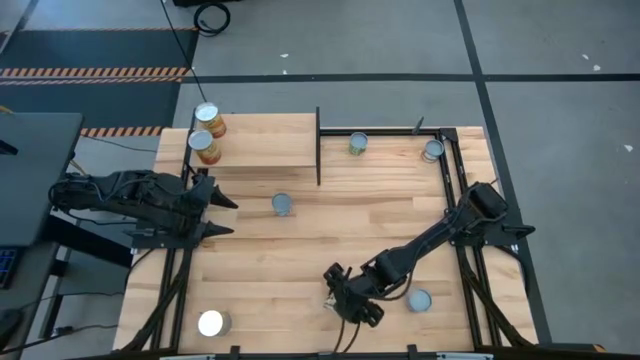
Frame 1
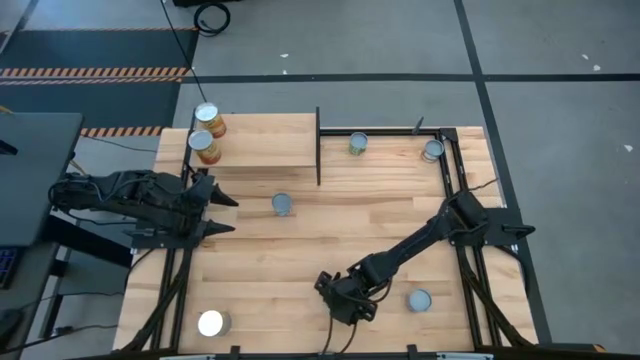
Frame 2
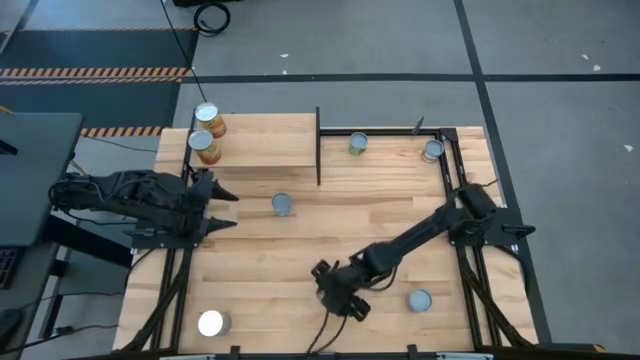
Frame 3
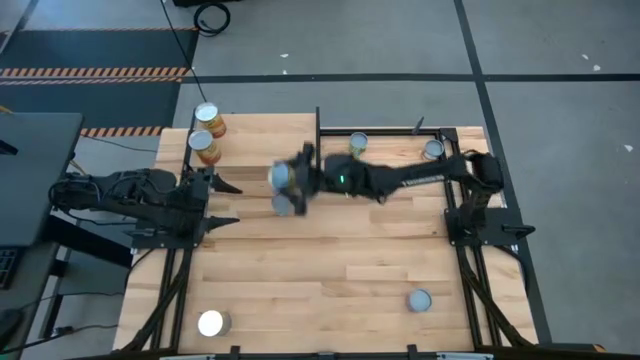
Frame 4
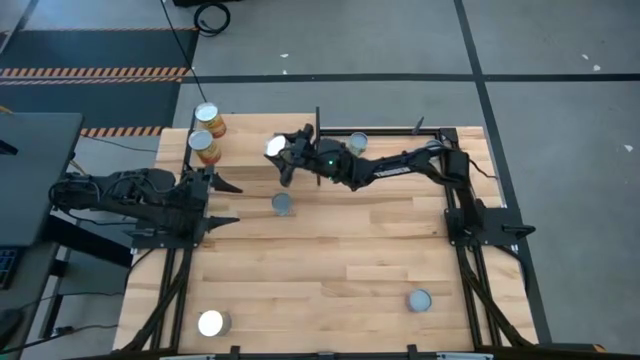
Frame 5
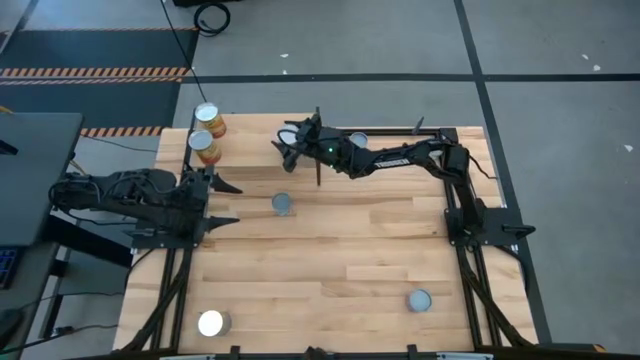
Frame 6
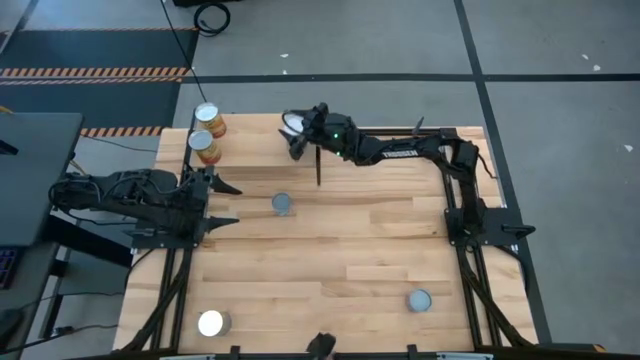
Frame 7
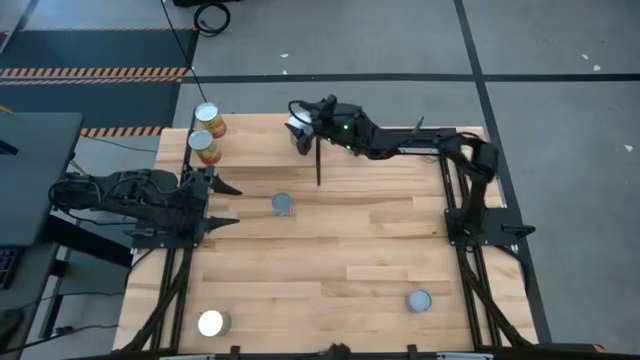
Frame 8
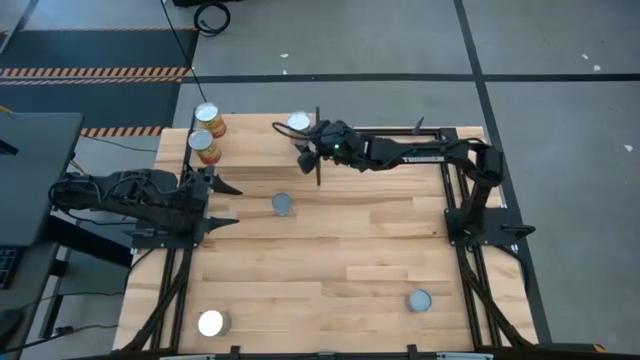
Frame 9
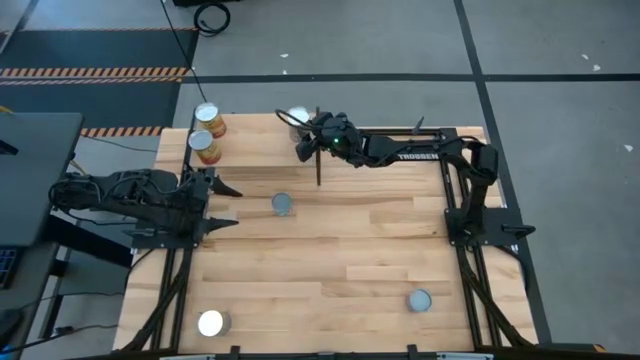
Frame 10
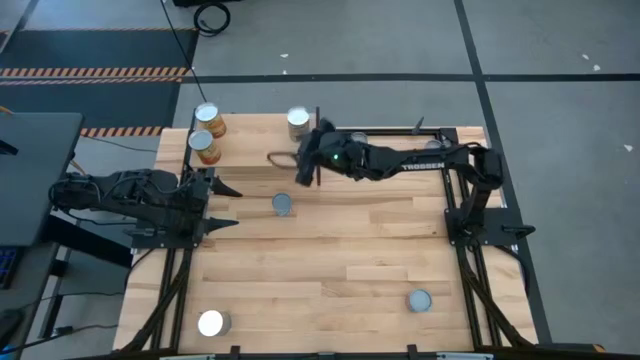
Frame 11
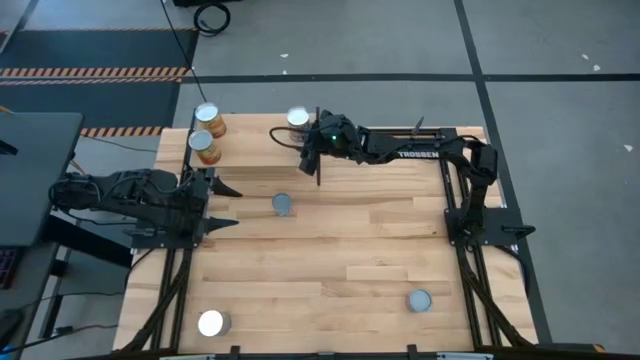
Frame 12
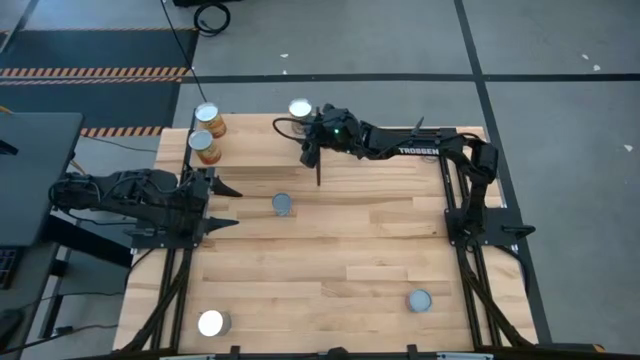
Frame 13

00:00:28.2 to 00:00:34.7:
Task: Pick and place cans onto a shelf
Put the right canned peaches on the shelf

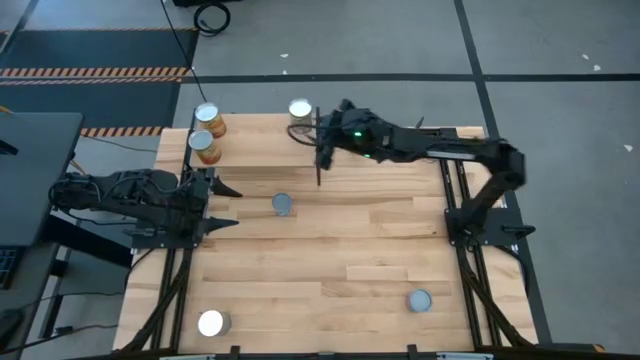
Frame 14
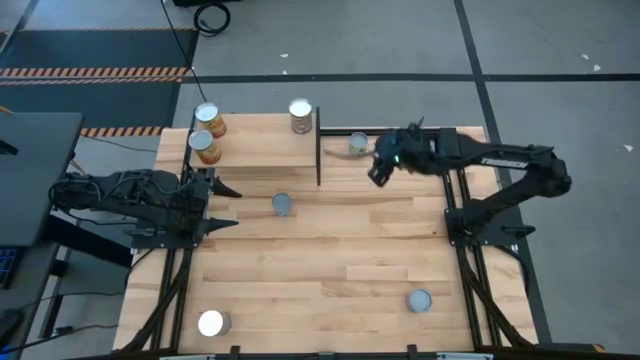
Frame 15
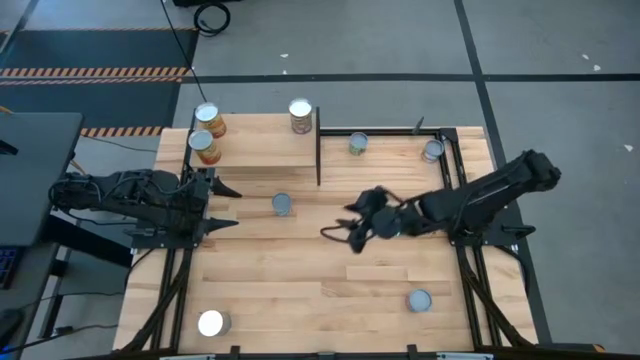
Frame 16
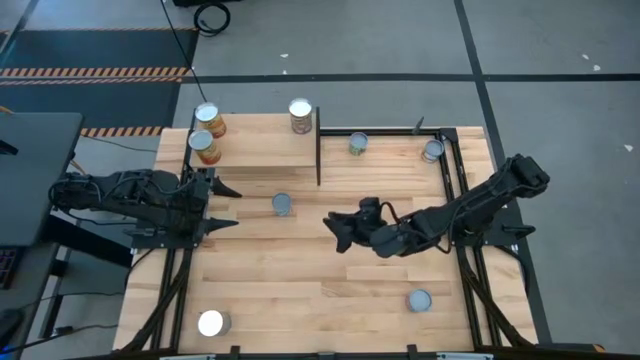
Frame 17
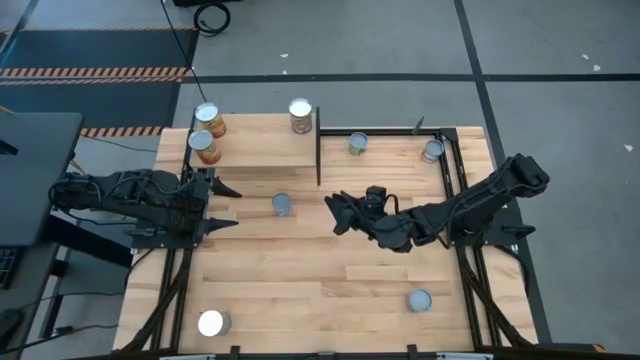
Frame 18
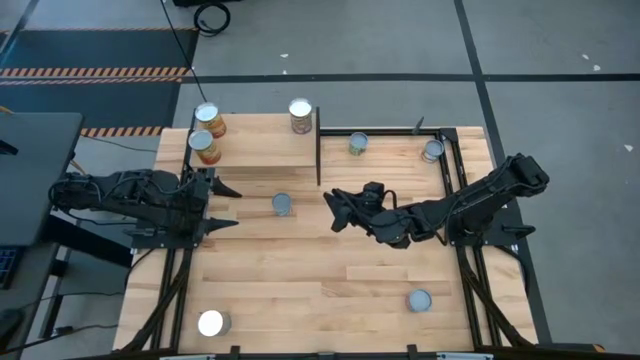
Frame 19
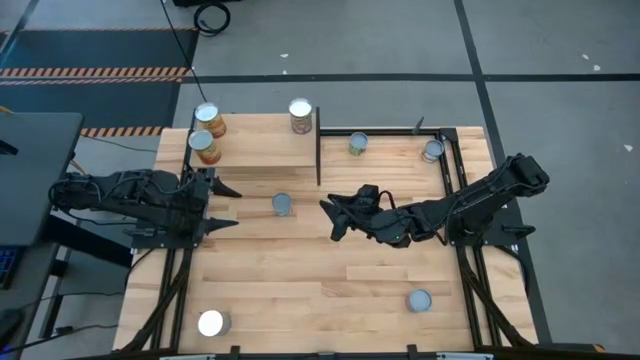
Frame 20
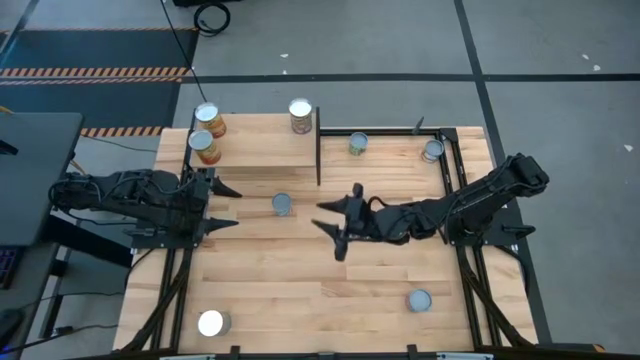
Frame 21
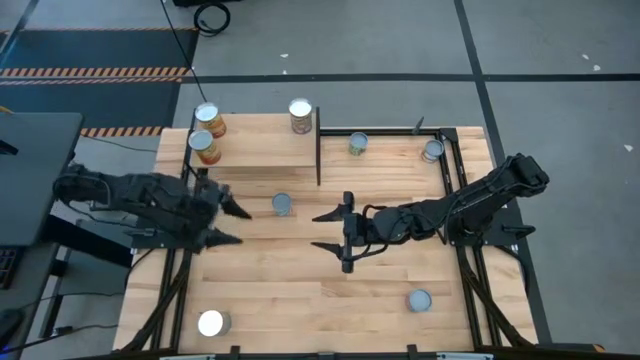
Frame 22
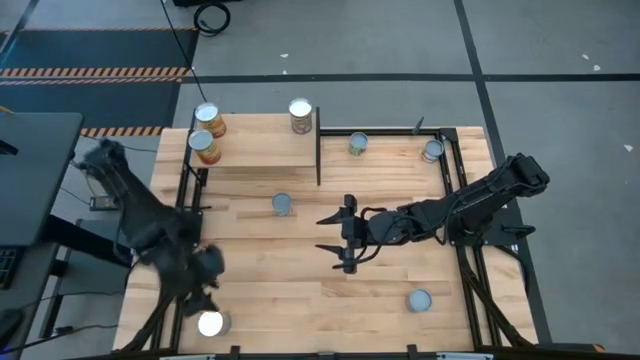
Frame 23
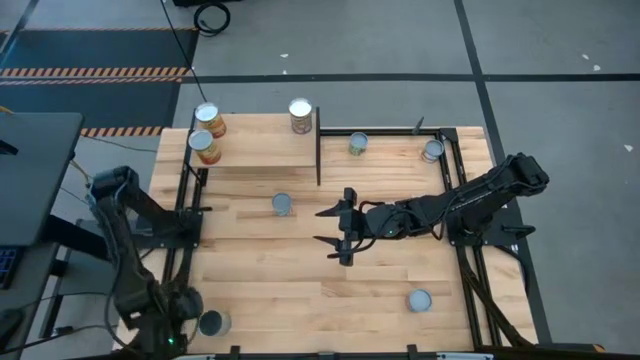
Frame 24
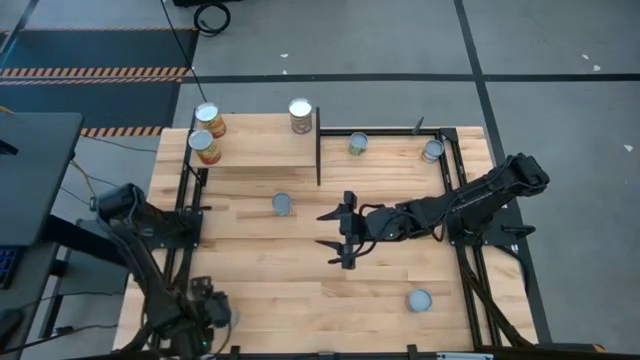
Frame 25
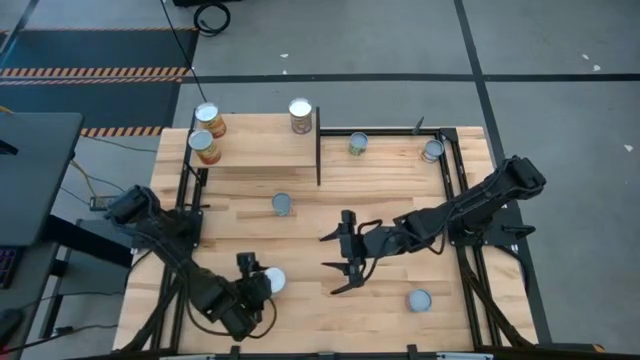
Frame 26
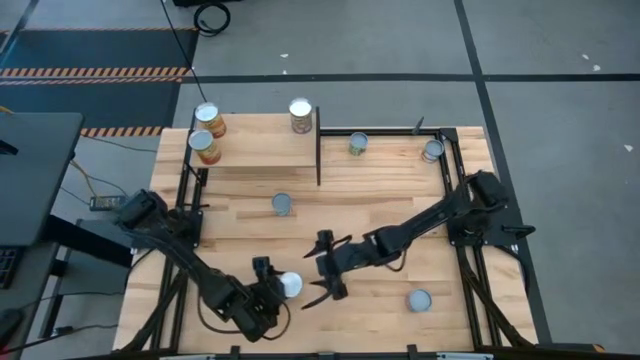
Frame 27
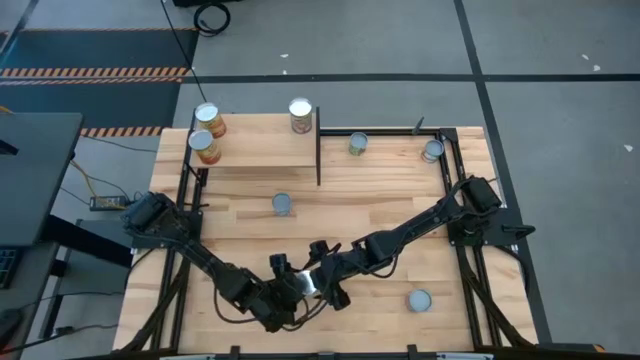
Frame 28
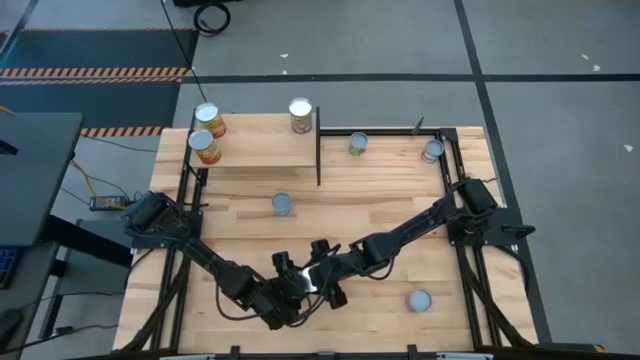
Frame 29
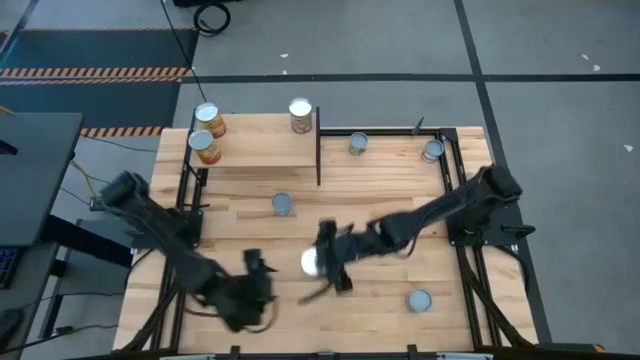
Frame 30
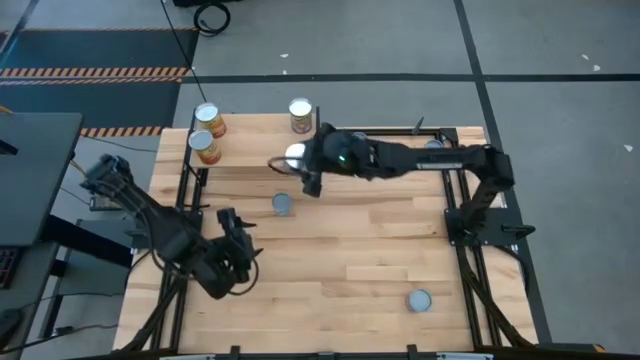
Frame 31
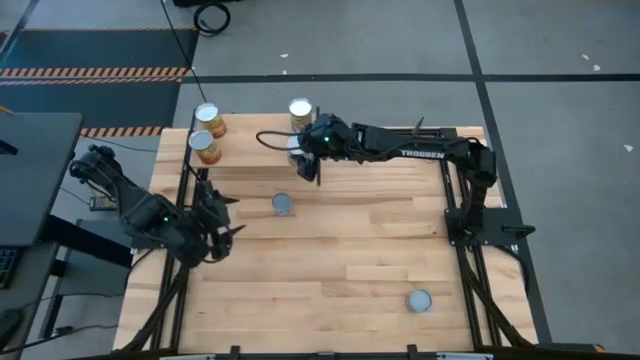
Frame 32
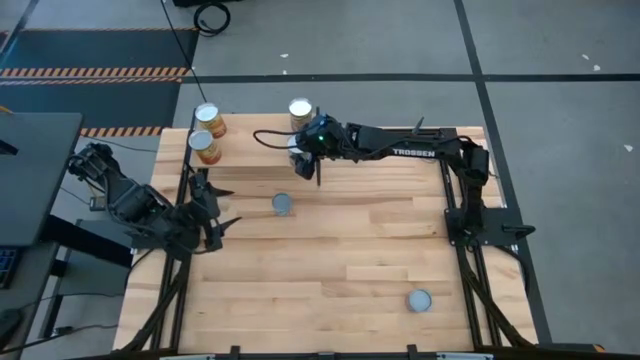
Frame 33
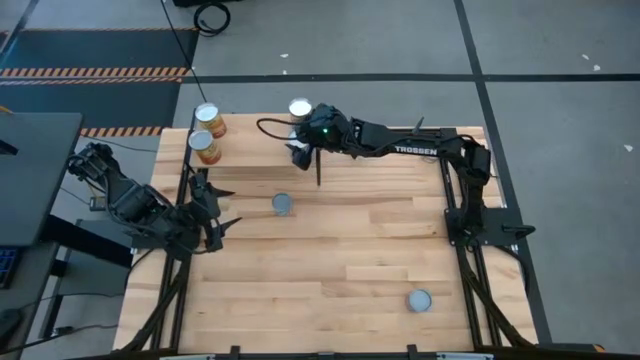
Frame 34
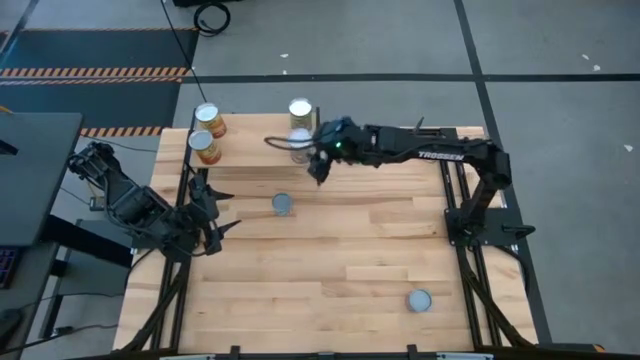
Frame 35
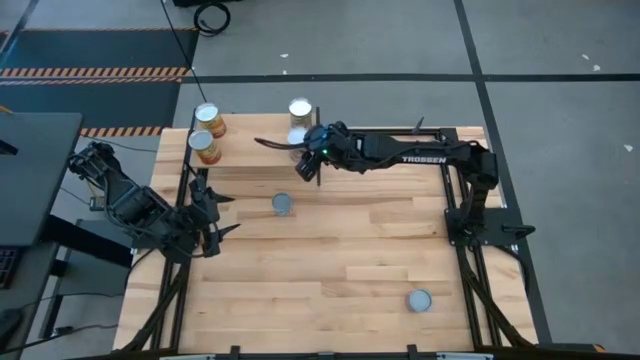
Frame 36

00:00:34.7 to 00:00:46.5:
Put the canned peaches on the shelf

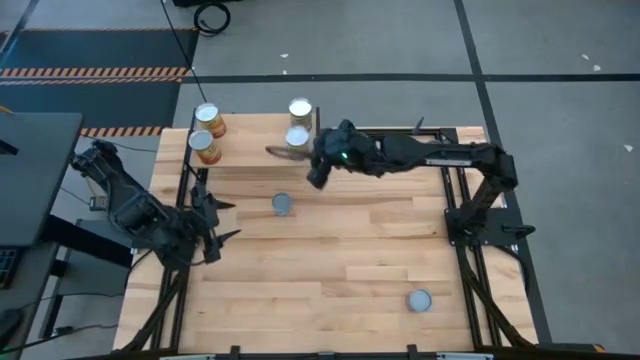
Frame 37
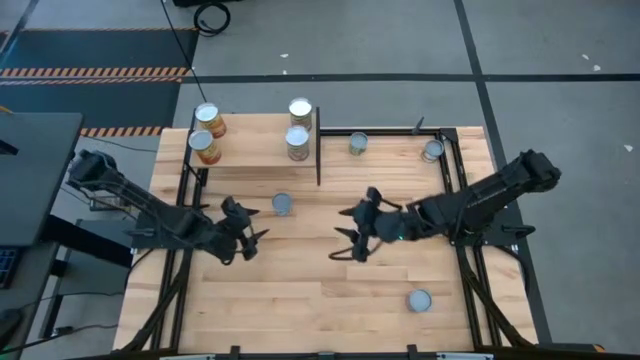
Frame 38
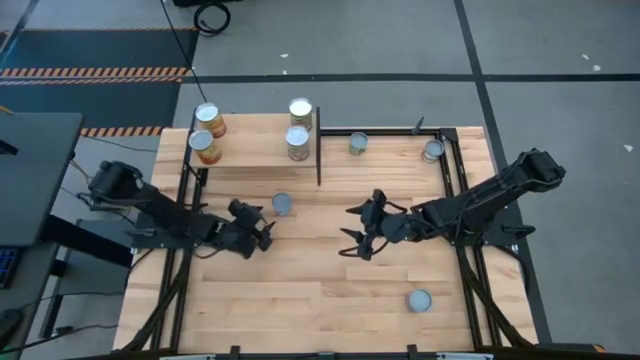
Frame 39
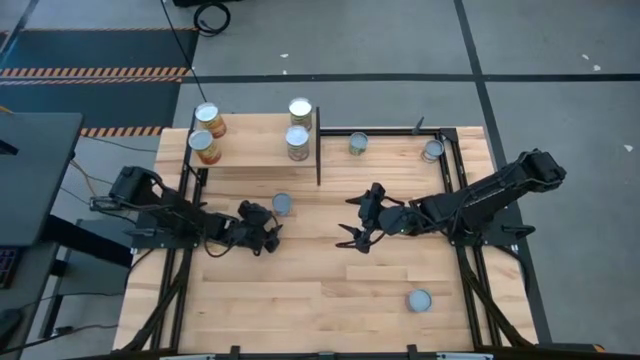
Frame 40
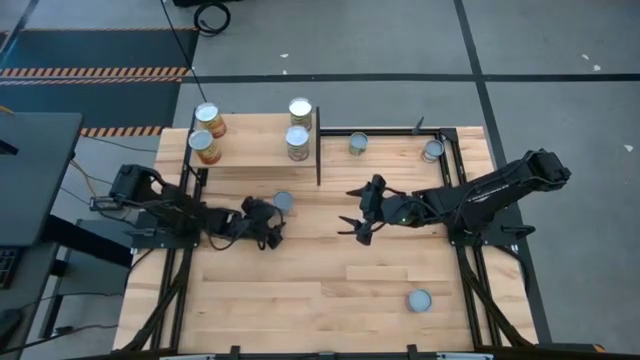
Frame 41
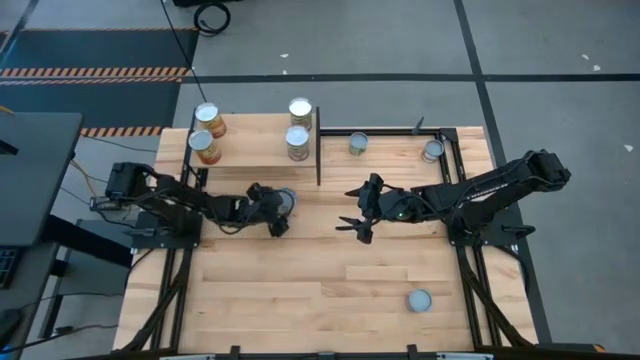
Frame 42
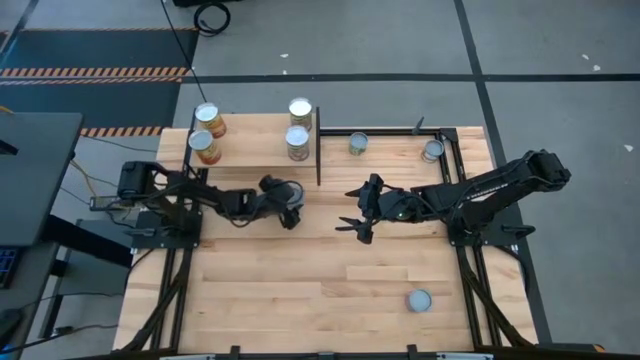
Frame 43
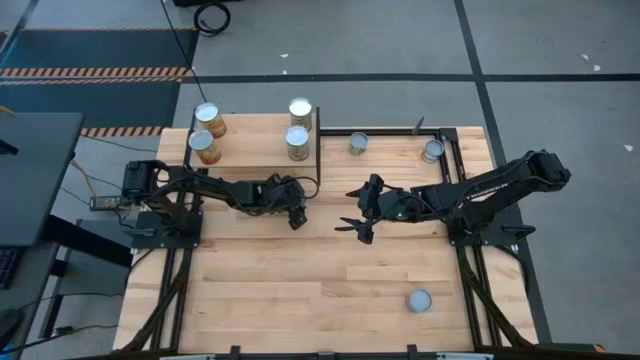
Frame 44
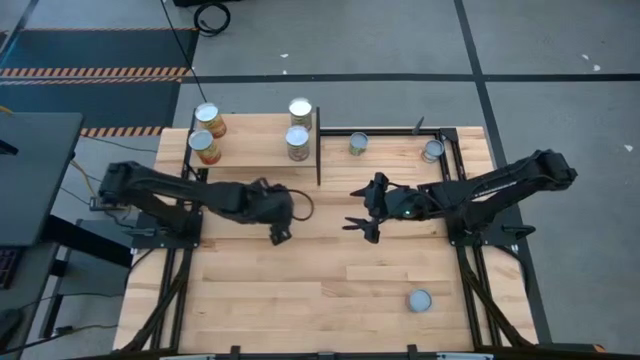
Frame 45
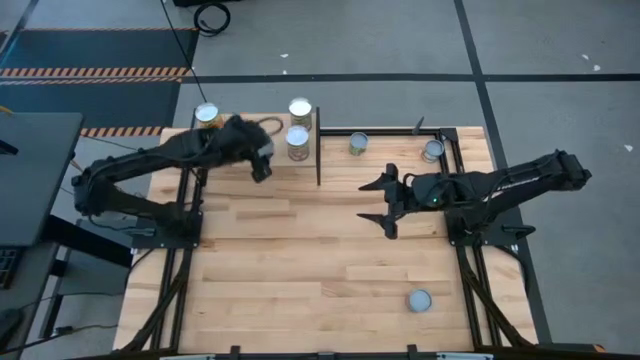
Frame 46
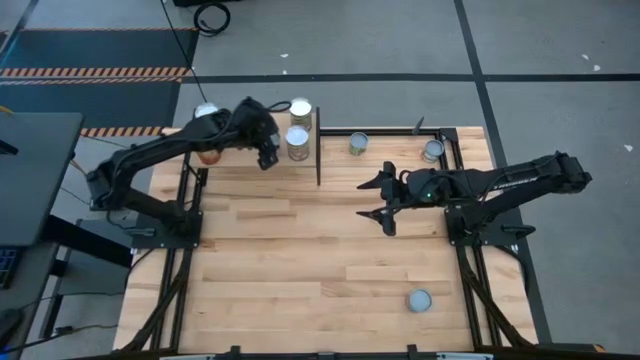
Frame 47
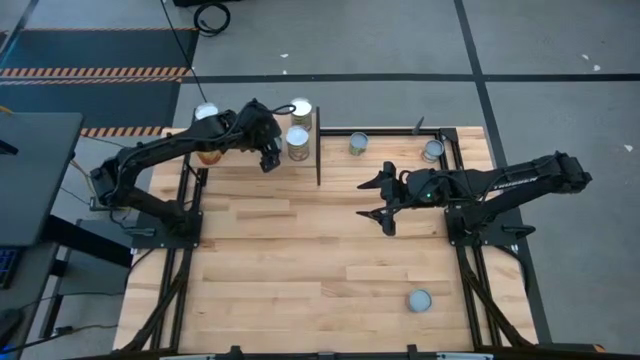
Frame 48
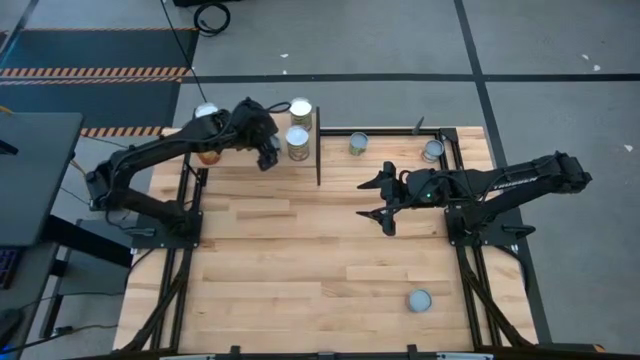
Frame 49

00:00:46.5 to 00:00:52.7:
Put the canned carrot on the shelf
